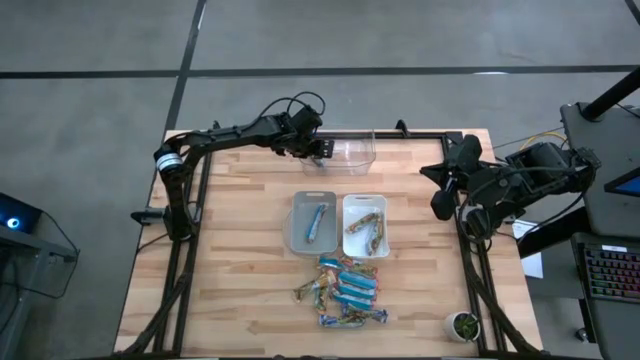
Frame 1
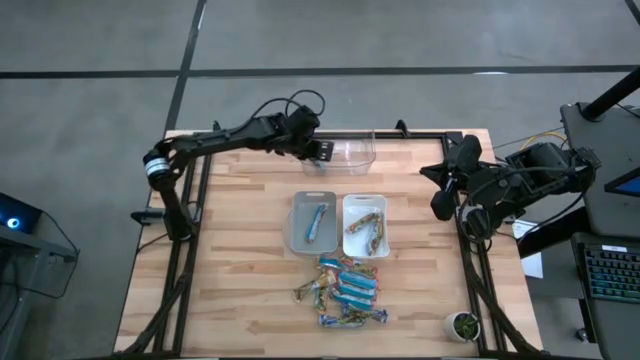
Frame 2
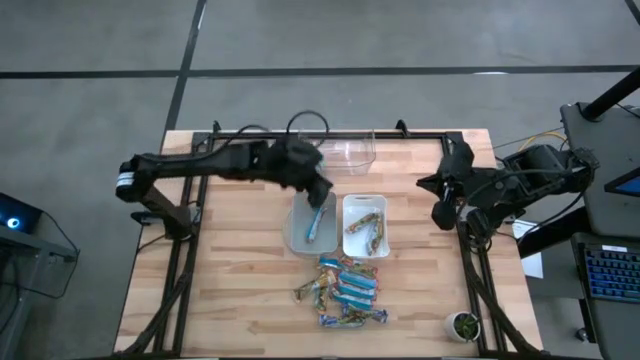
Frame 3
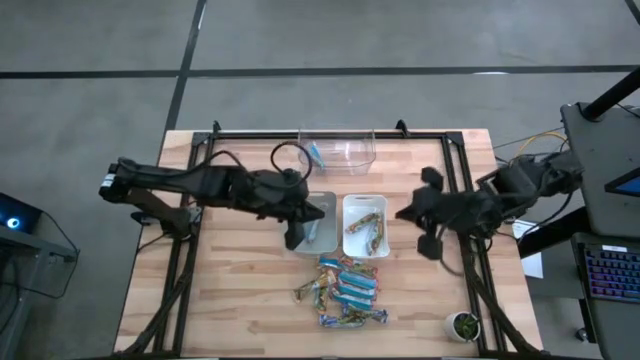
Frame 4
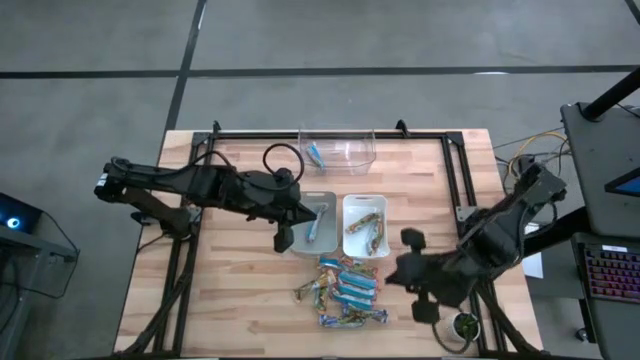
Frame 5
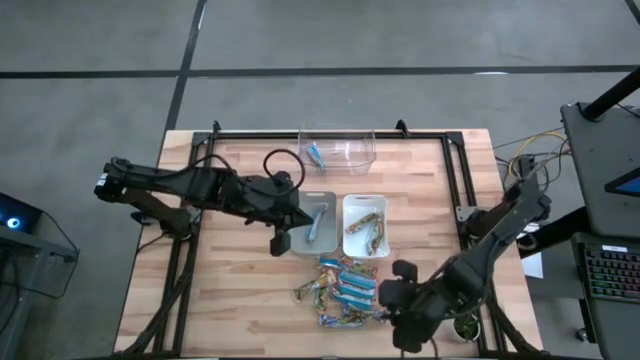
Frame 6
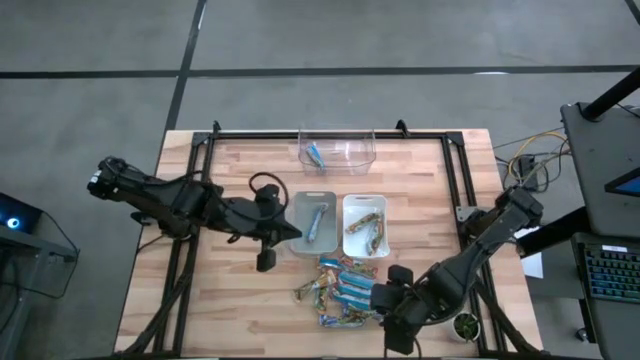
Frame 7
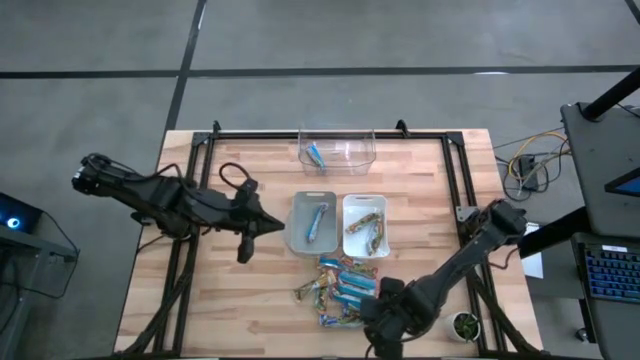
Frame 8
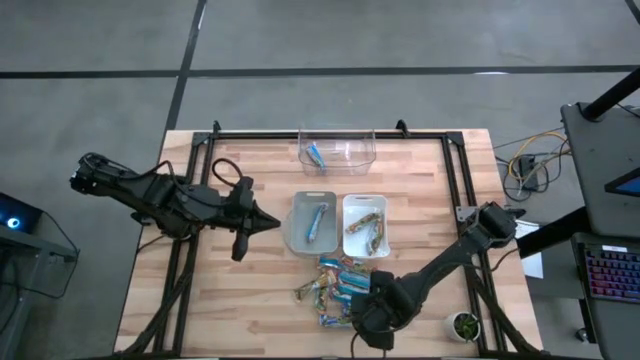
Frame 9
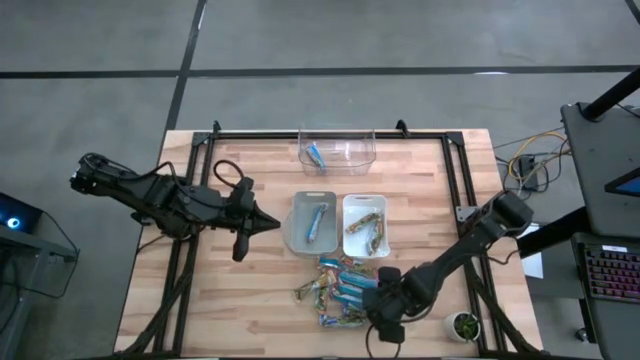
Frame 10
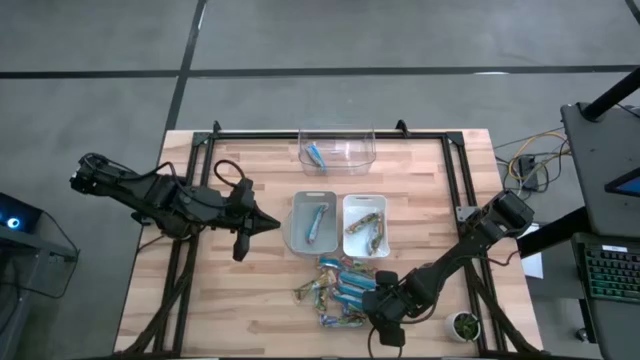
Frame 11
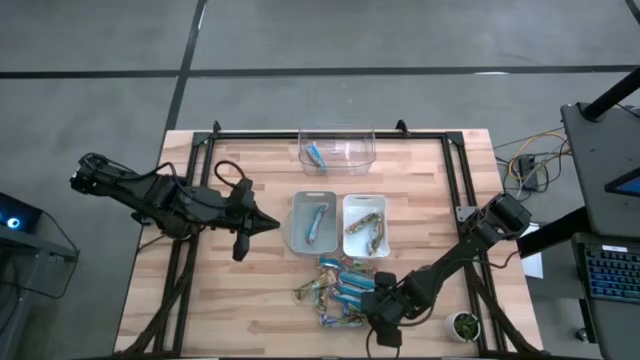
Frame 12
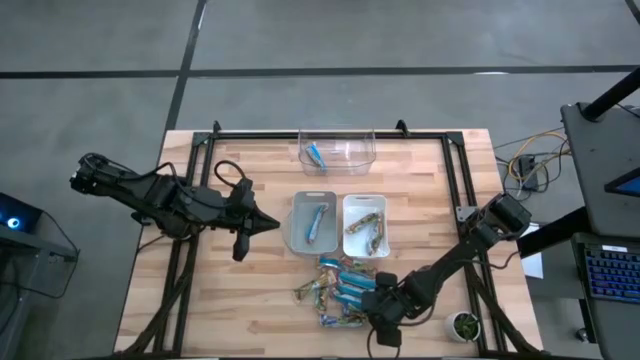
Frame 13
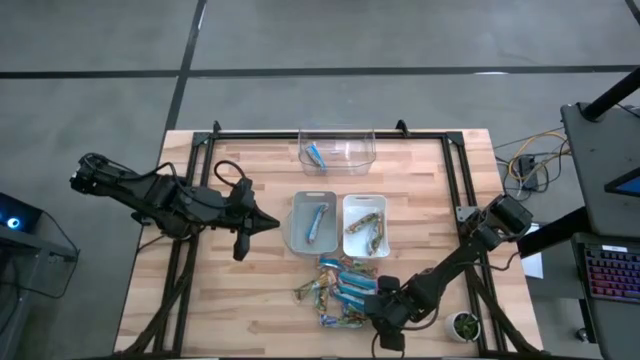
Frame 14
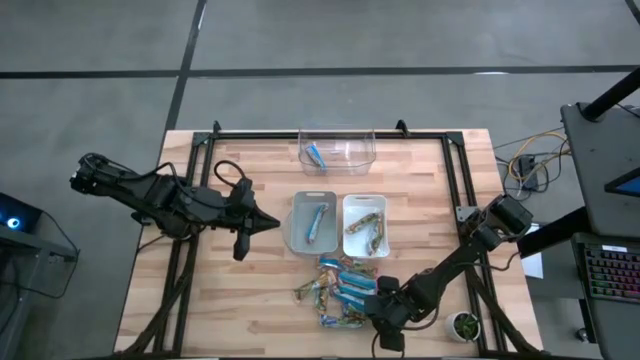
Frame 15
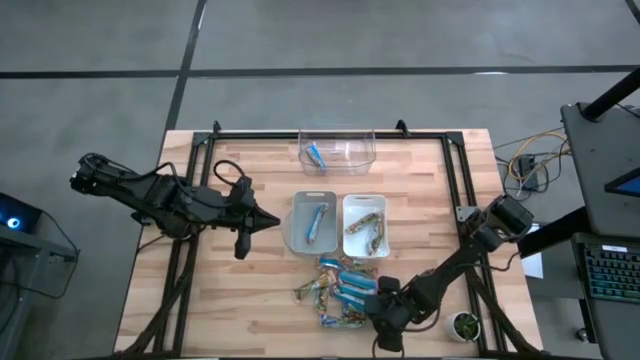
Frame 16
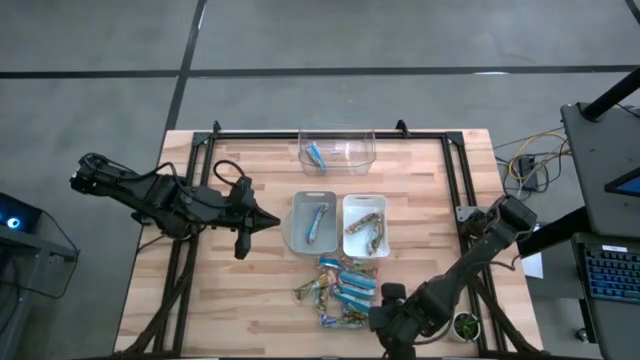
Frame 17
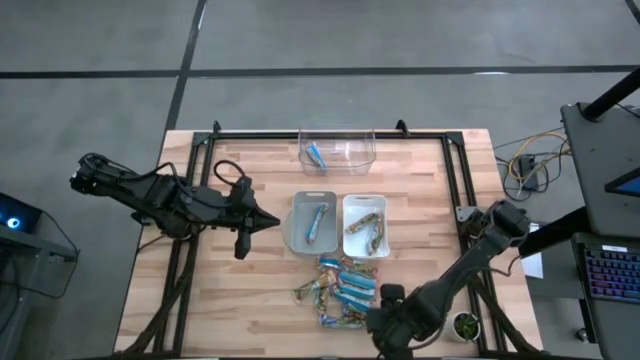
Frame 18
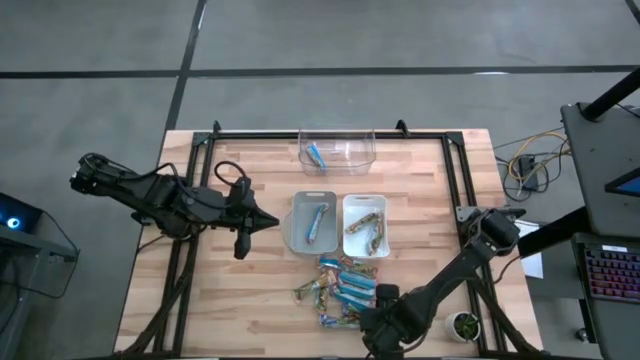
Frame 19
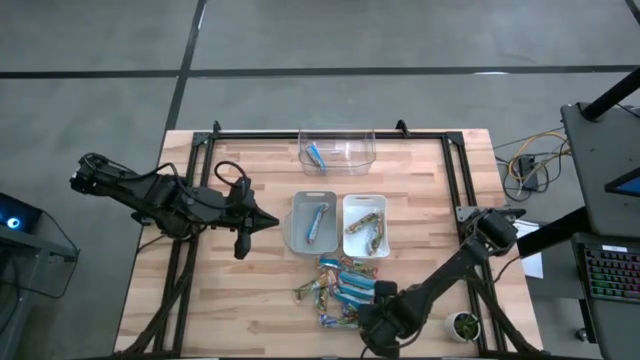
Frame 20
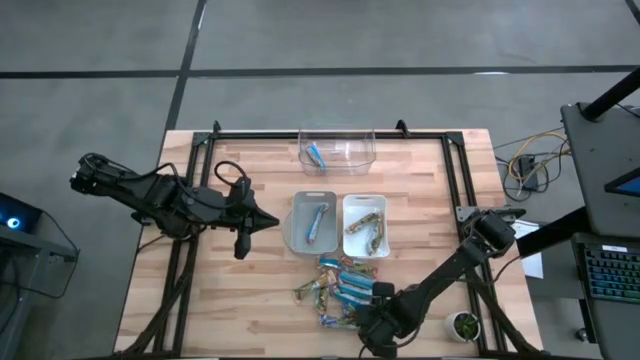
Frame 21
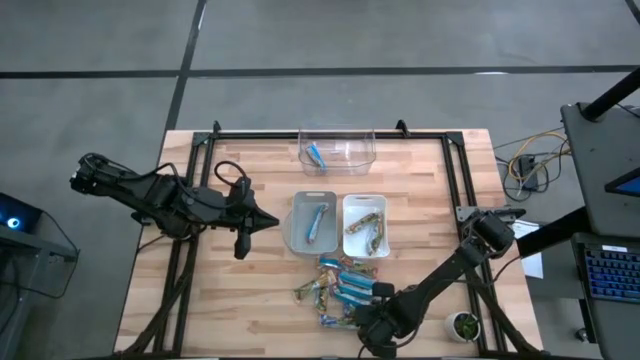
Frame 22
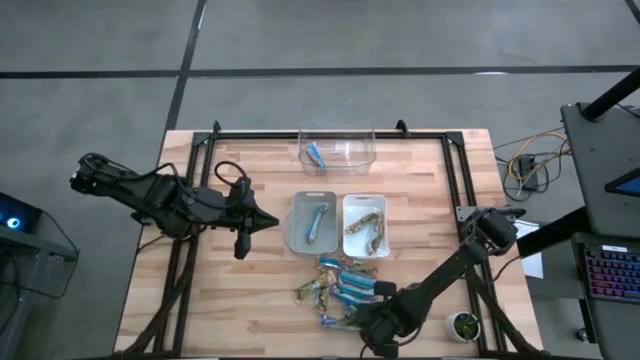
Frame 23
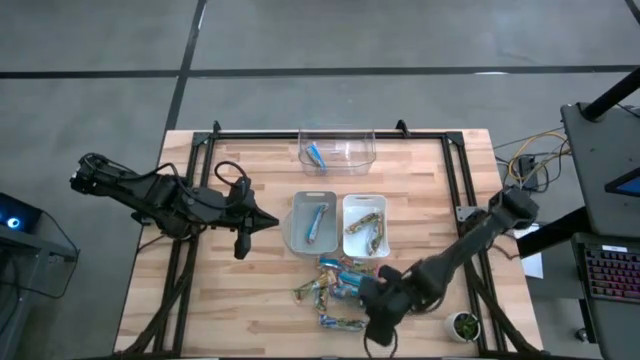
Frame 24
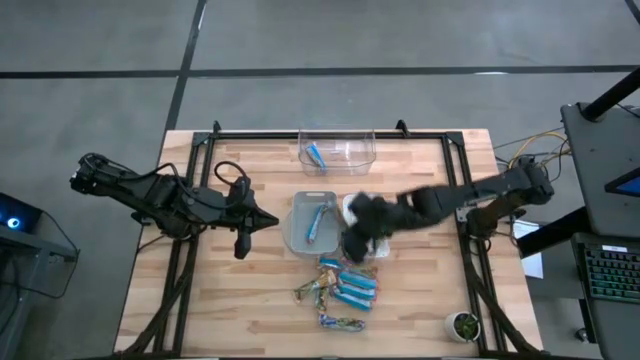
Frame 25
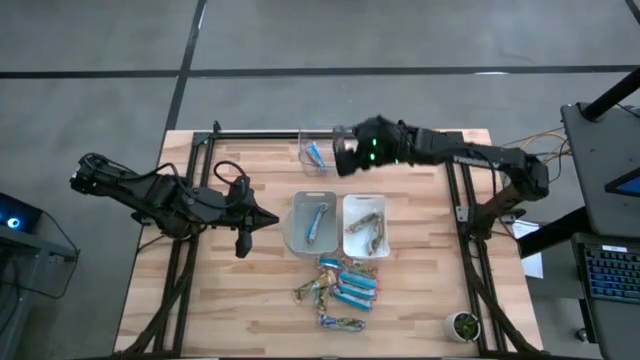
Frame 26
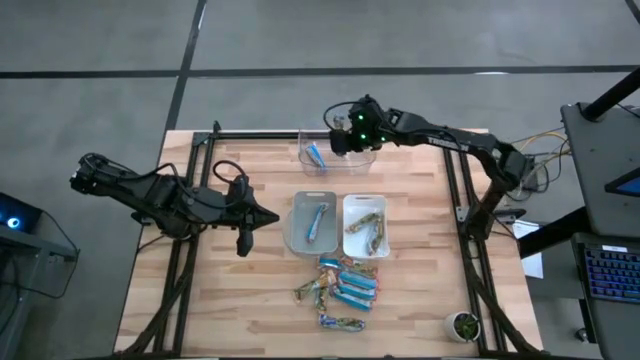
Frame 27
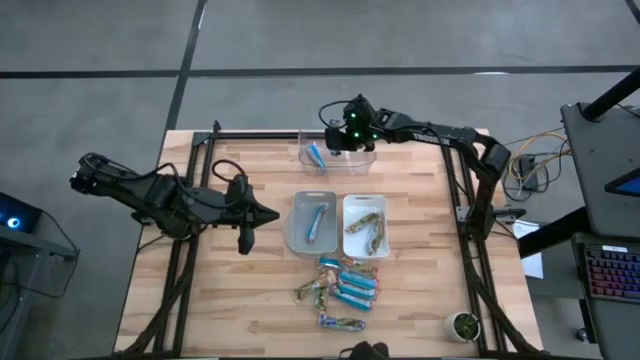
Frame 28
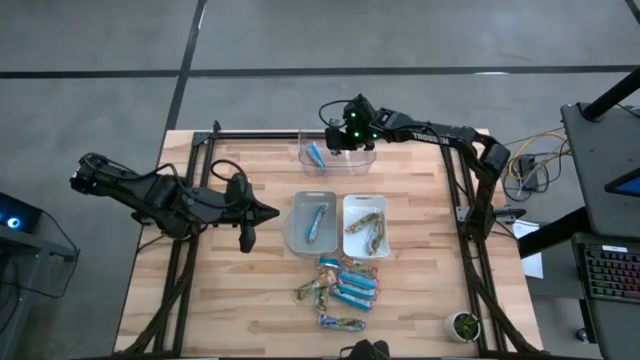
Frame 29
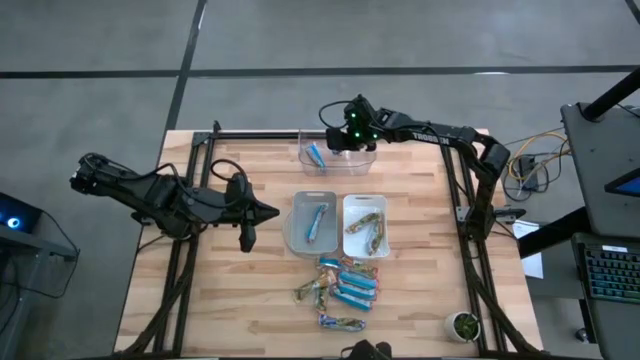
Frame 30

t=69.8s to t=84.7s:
Task: Pick and place Granola Bars by type
Put the blue granola bar into the transparent bin

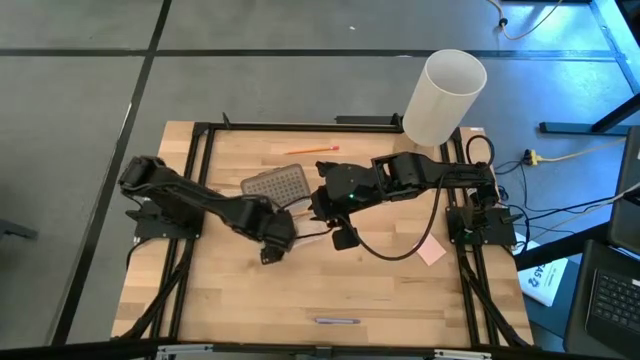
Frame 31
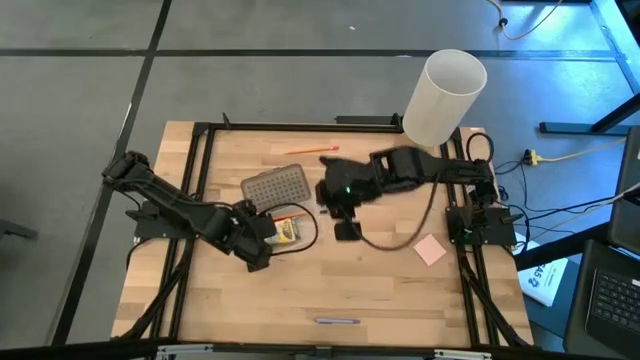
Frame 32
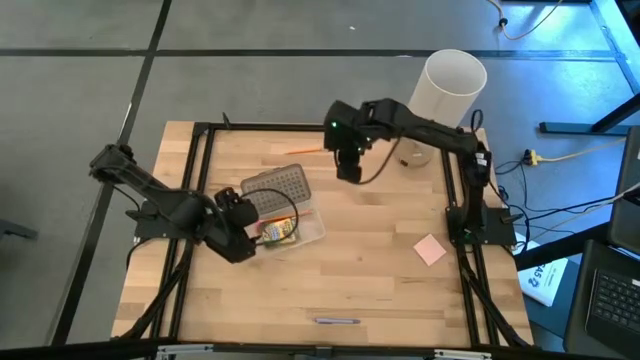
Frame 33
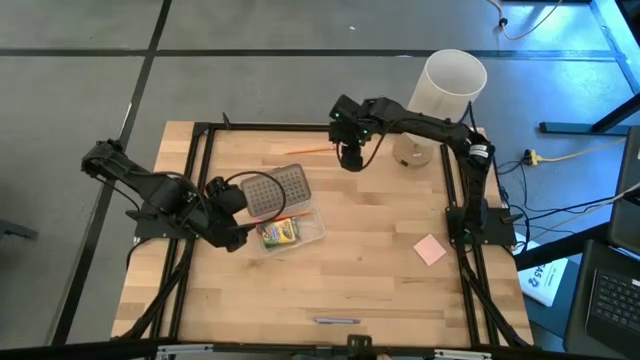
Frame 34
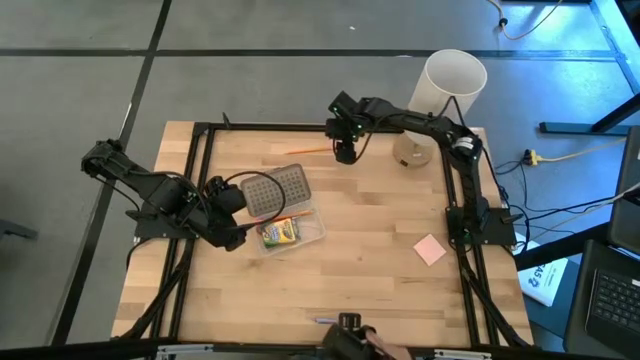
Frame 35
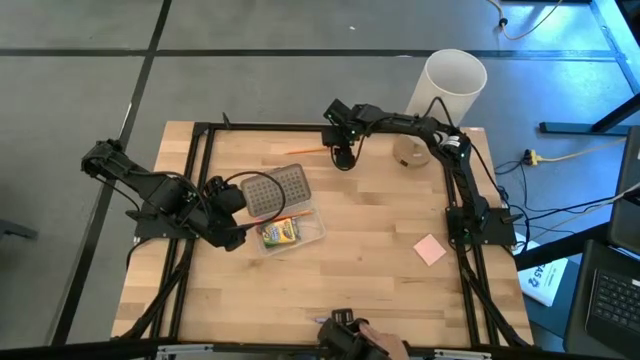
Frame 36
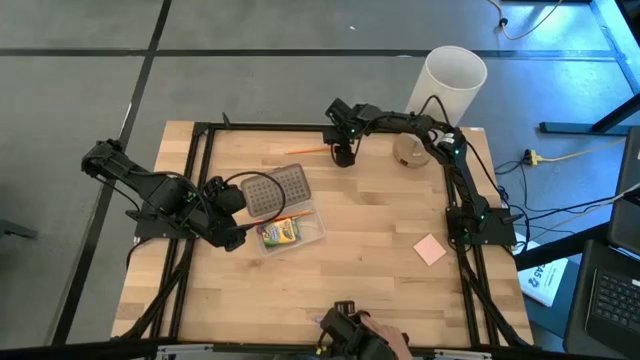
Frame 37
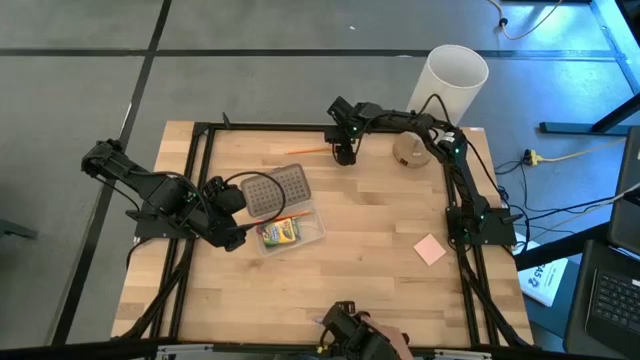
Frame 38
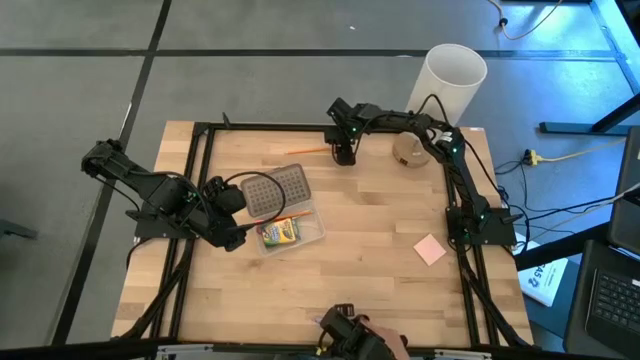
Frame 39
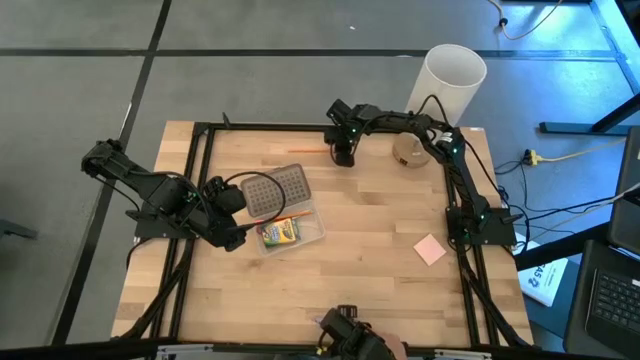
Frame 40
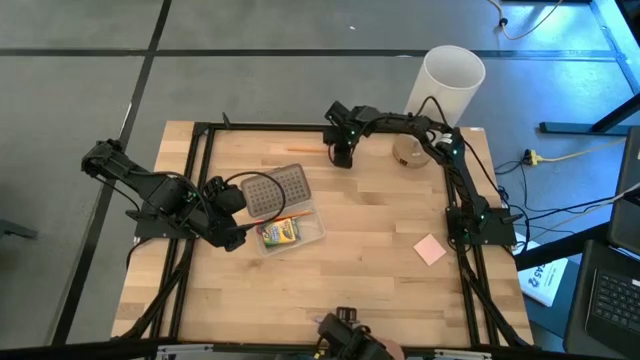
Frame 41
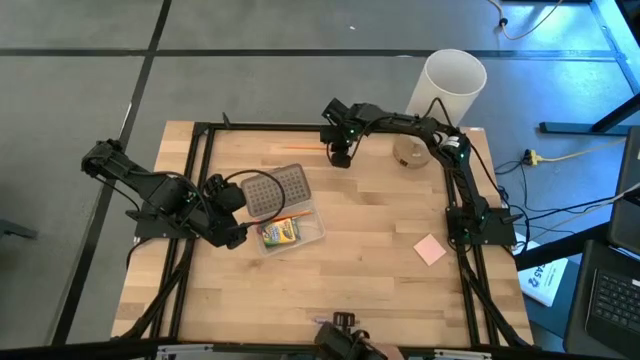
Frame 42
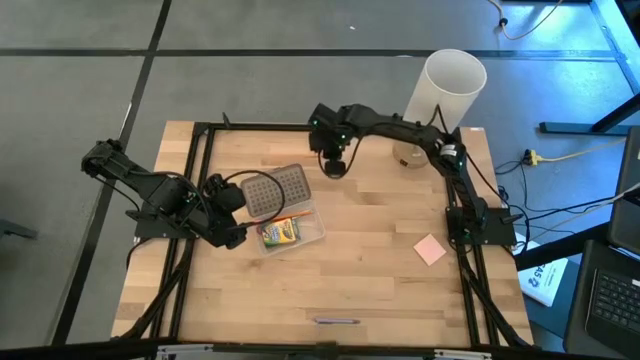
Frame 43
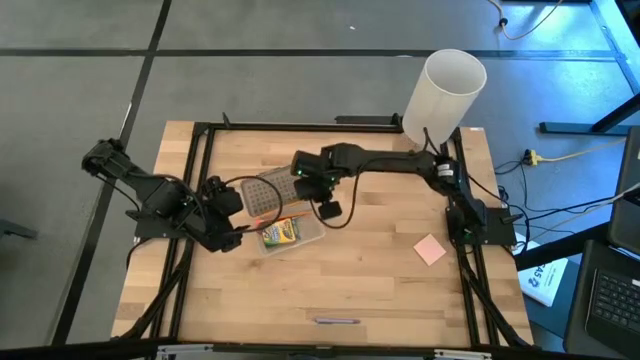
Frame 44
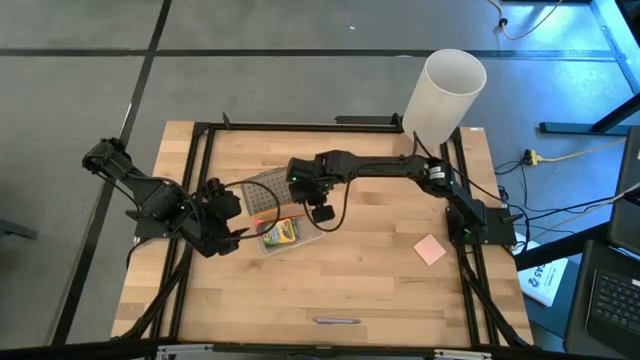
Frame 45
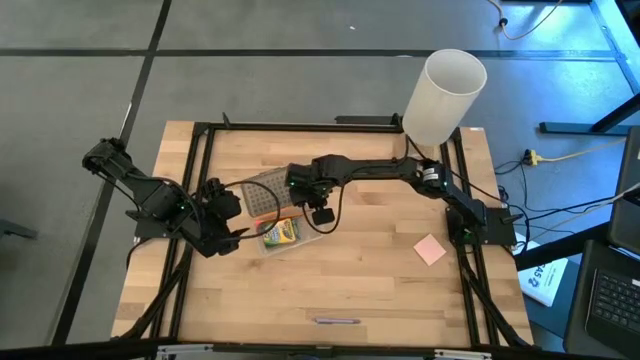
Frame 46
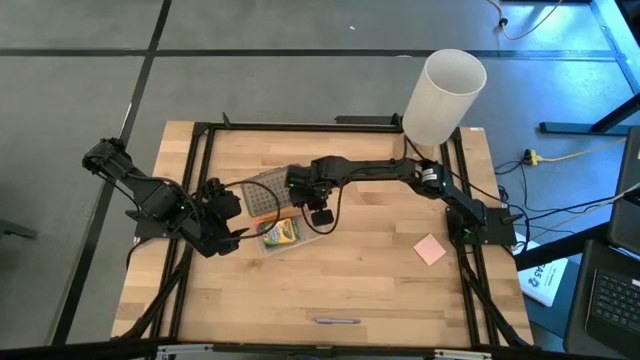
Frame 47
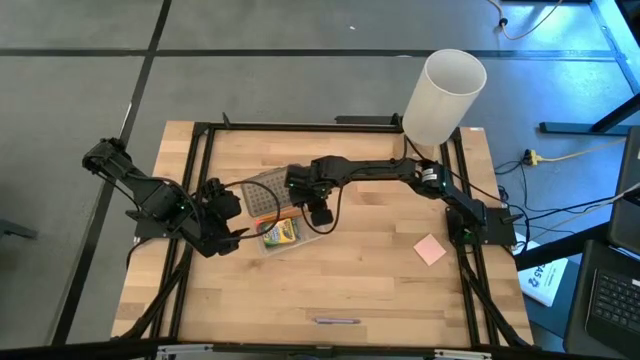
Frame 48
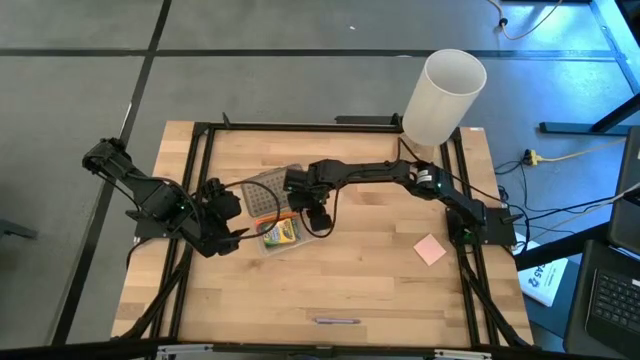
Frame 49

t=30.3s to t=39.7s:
Task: Pack school essentials
Put the orange pencil into the transparent supply box
